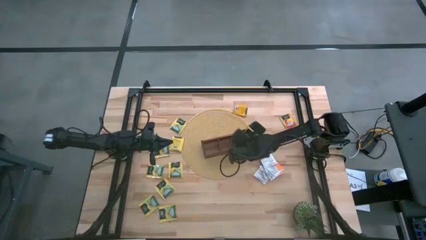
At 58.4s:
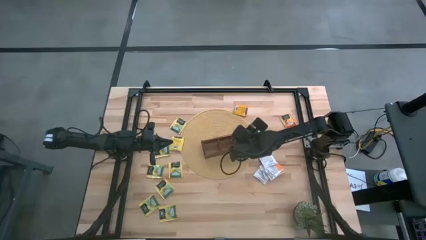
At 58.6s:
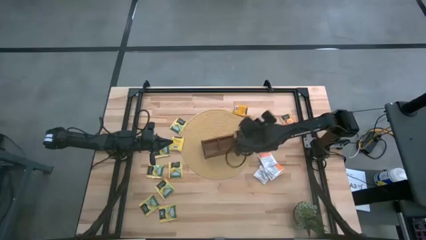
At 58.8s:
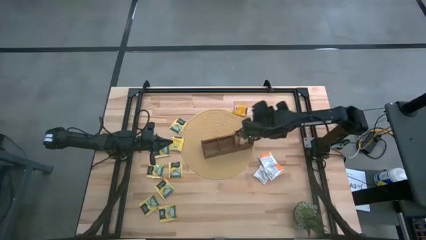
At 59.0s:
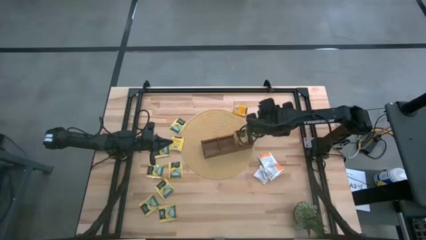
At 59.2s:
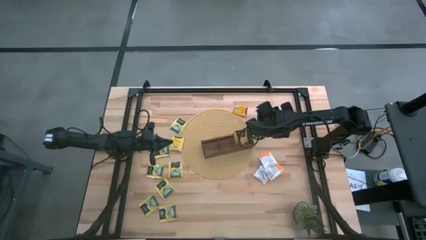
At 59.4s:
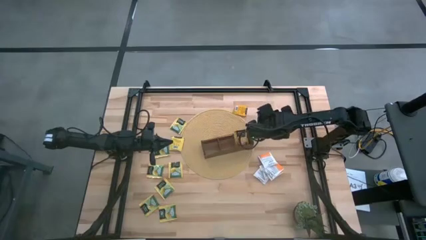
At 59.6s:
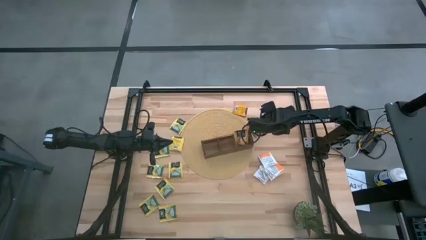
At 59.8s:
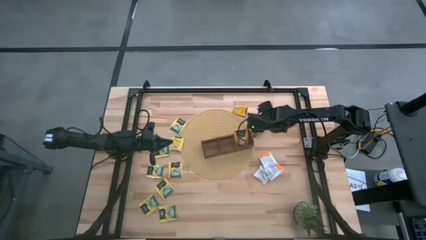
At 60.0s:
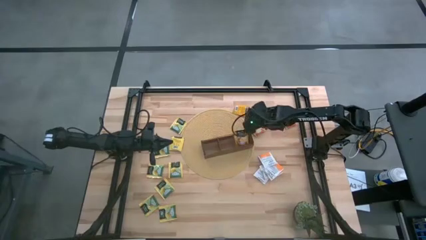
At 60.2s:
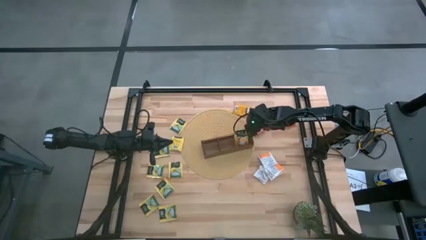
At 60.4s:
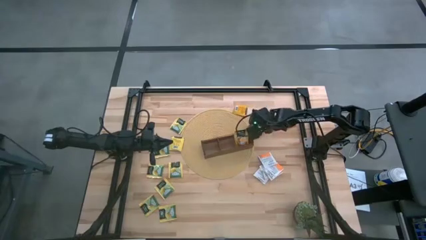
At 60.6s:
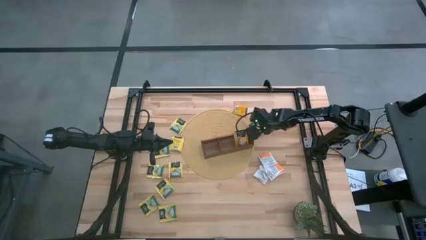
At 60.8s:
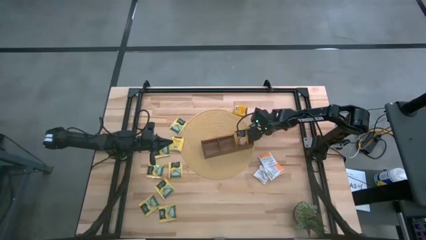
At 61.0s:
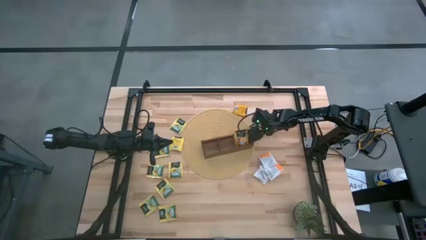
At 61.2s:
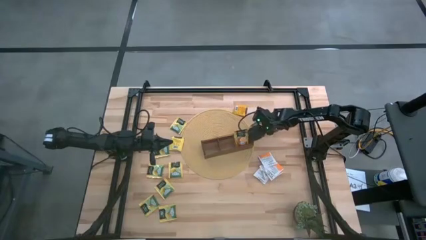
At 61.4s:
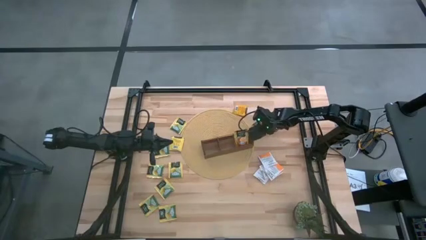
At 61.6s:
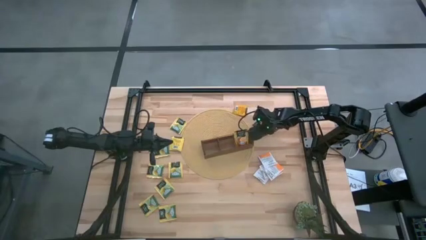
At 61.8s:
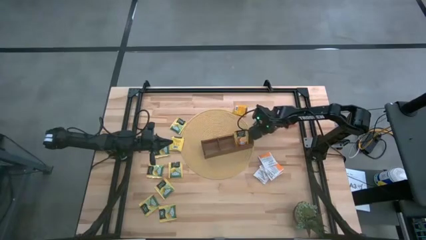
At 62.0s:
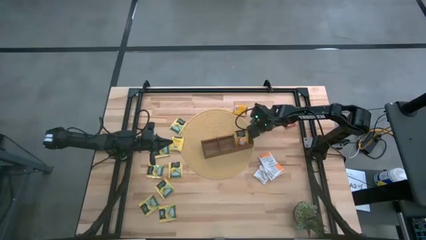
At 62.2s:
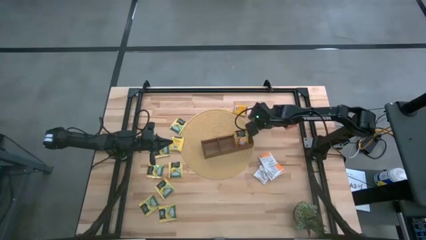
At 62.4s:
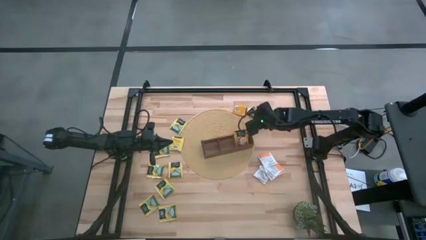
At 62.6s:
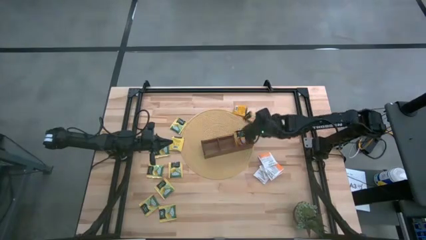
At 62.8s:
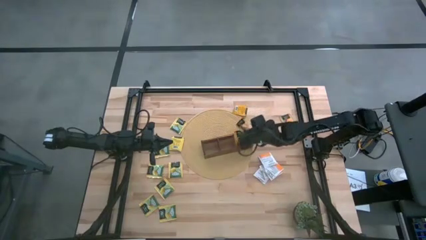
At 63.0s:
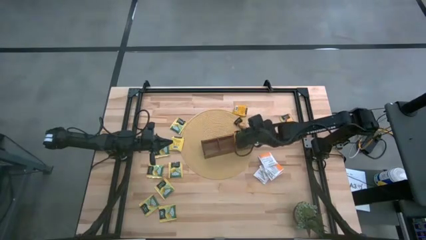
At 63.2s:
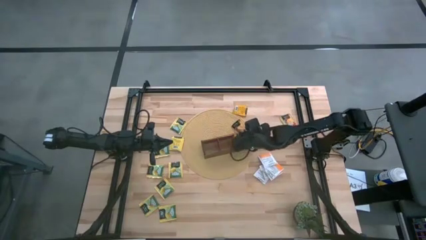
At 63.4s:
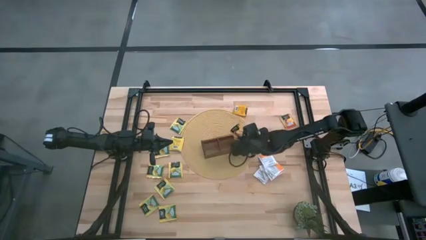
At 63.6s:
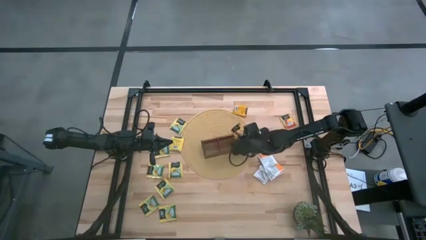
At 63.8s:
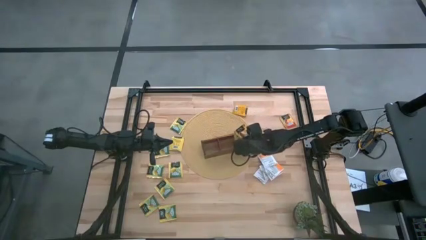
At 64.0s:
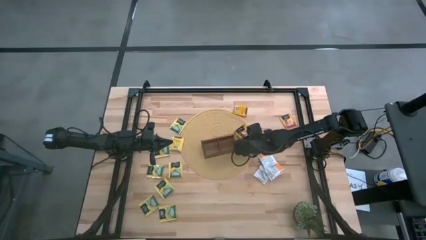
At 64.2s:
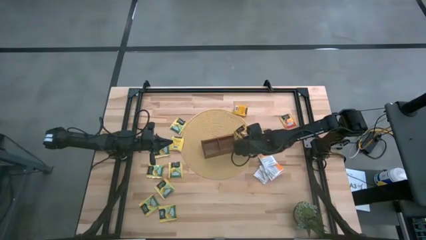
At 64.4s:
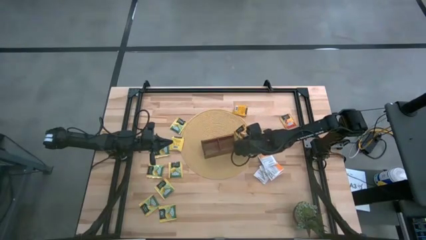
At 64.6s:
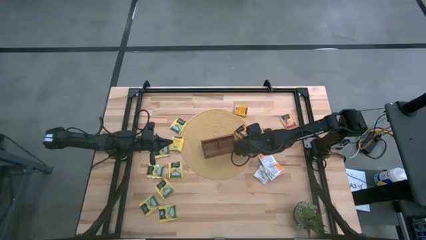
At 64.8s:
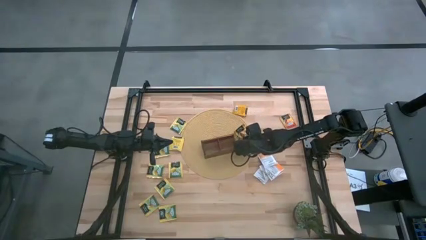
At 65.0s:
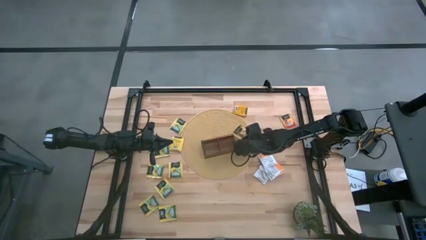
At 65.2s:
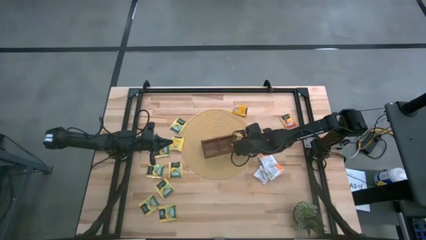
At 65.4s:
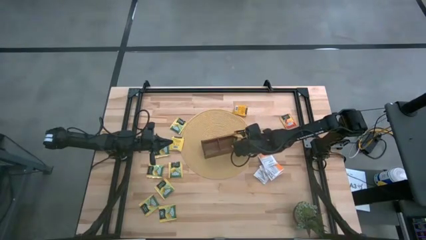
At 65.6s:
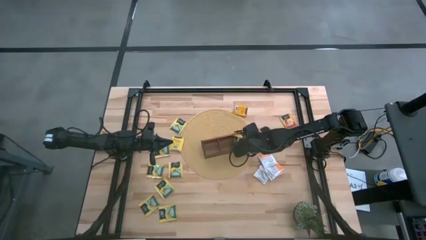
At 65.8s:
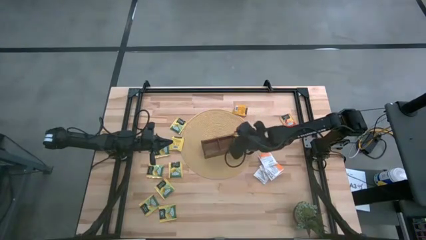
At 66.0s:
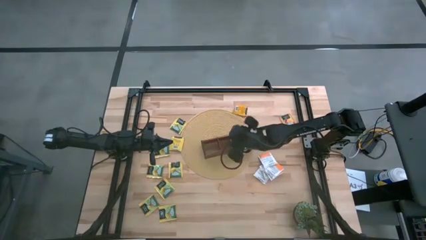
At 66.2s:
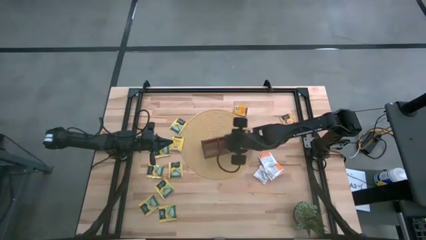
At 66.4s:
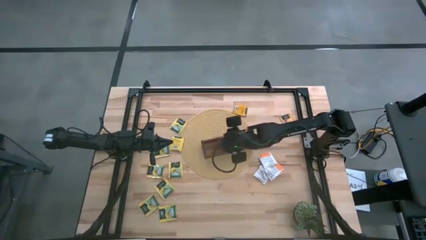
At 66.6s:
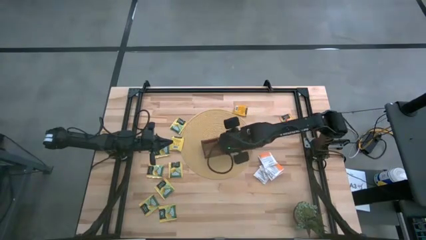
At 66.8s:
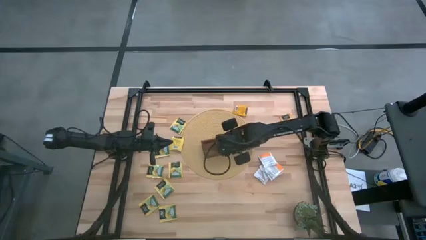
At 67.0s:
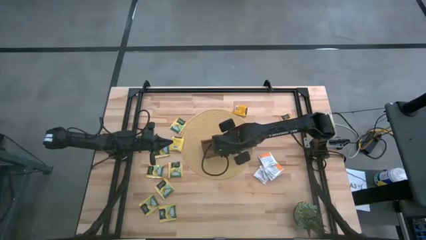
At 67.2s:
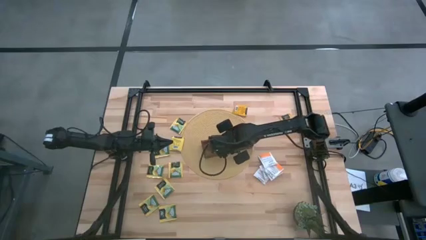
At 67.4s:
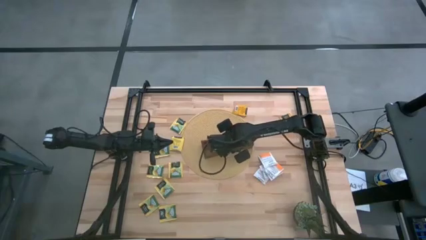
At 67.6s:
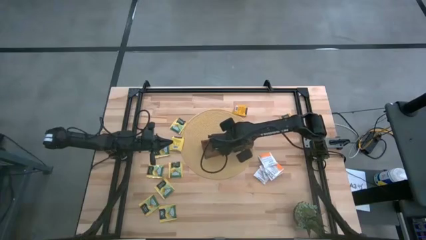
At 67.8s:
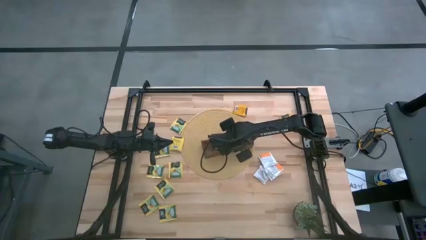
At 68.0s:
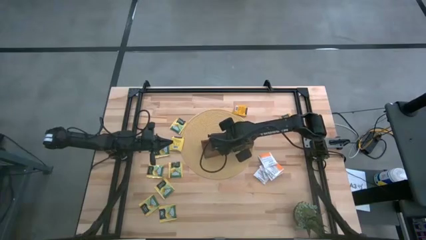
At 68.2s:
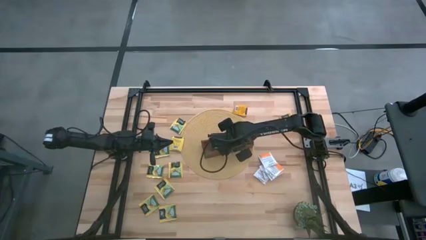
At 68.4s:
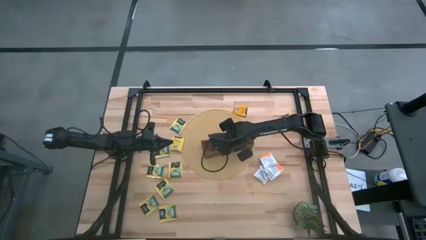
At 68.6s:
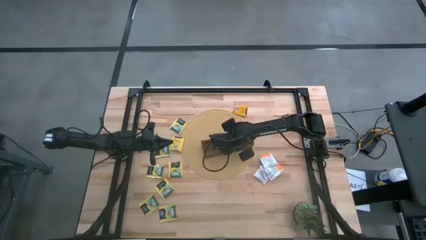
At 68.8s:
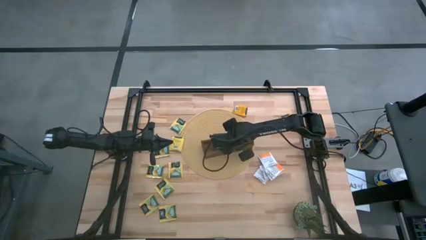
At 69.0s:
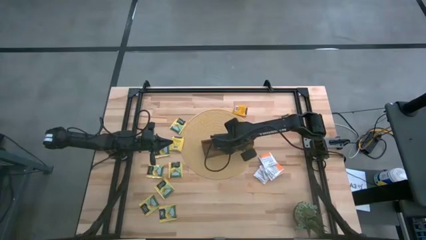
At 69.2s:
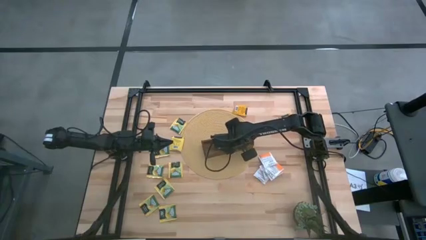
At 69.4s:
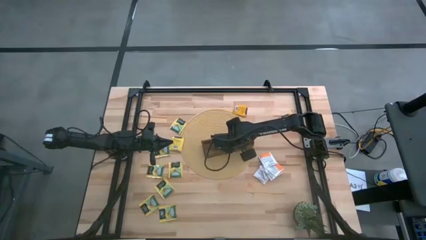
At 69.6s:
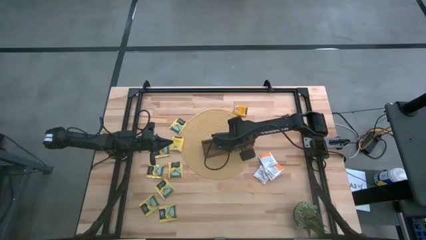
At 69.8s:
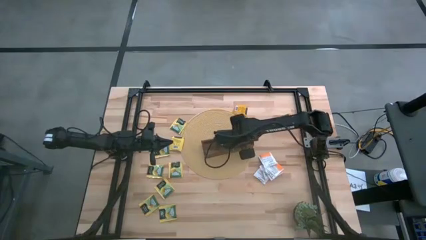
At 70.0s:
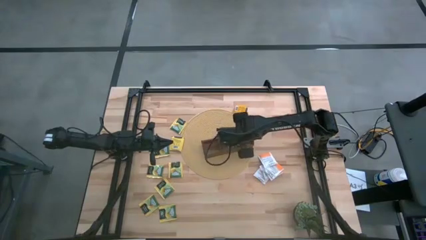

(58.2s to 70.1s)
Task: Pick & Place Tea
Put the orange tea bag into the right section of the wooden organizer

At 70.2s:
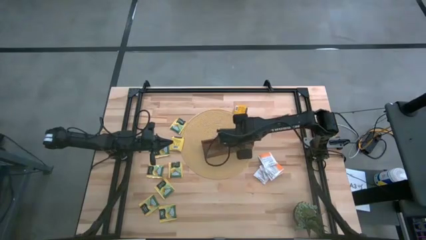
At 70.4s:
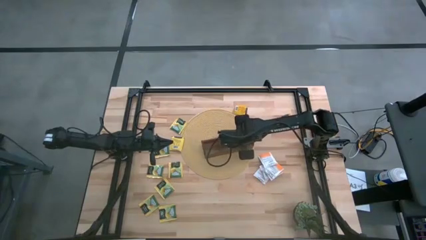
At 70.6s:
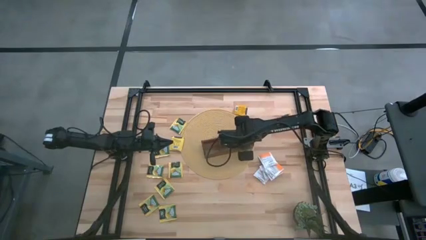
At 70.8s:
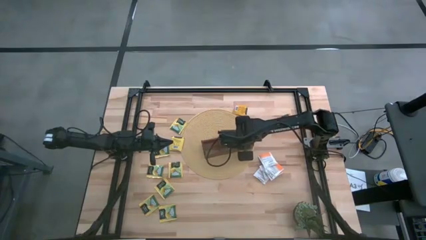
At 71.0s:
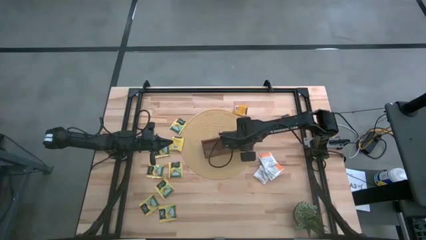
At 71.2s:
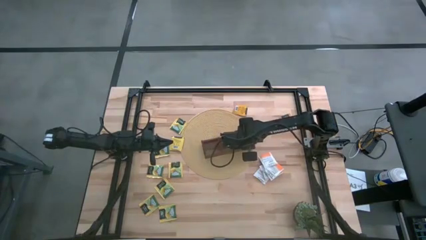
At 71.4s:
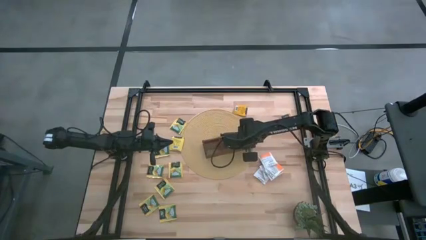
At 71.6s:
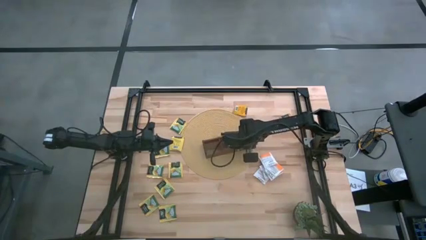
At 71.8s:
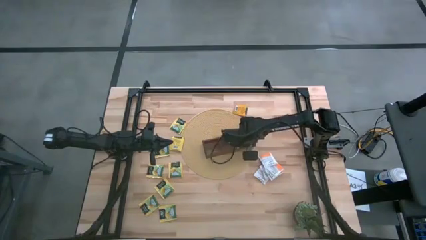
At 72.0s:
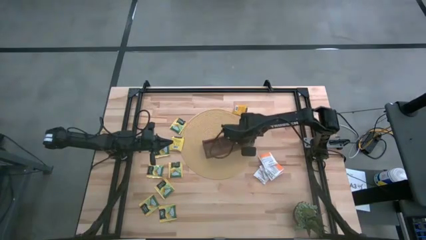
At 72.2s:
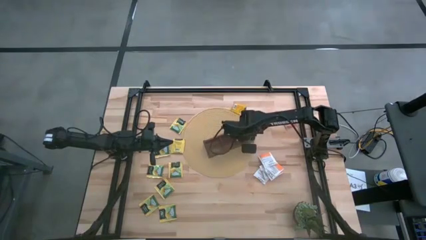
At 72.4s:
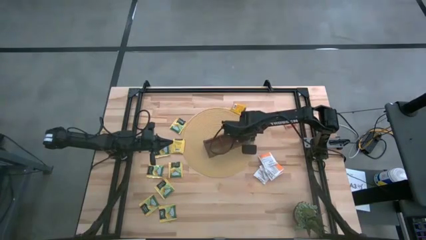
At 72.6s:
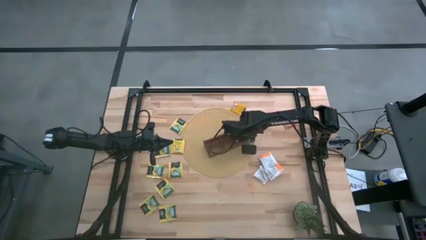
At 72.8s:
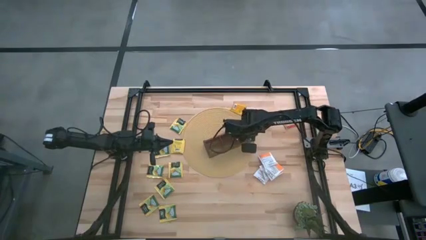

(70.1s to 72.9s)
Put the orange tea bag into the right section of the wooden organizer
